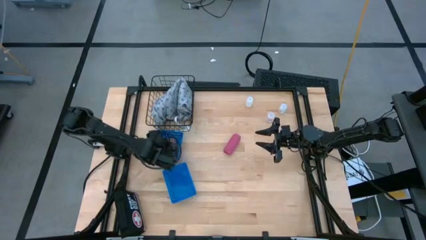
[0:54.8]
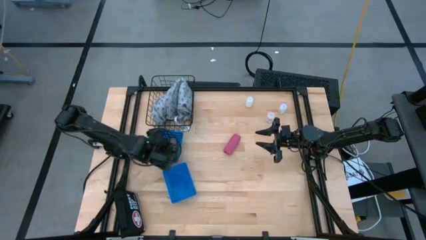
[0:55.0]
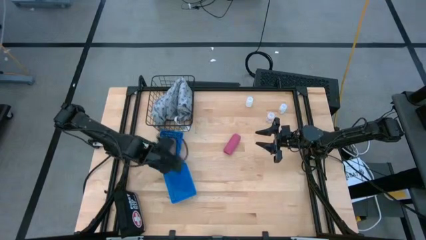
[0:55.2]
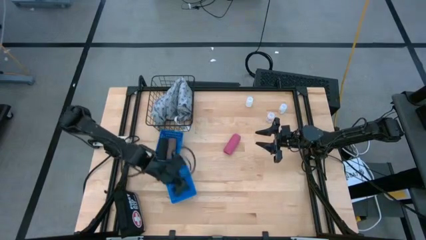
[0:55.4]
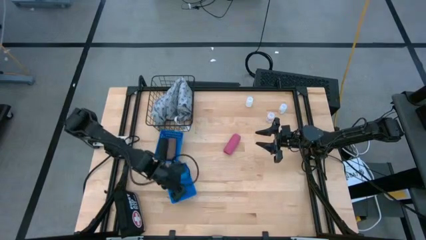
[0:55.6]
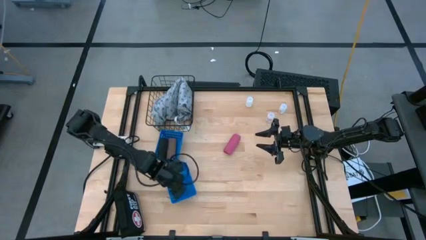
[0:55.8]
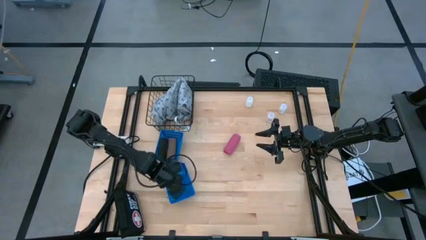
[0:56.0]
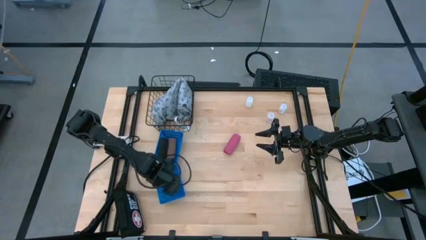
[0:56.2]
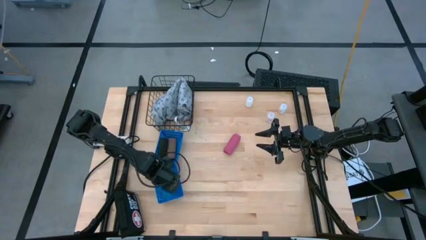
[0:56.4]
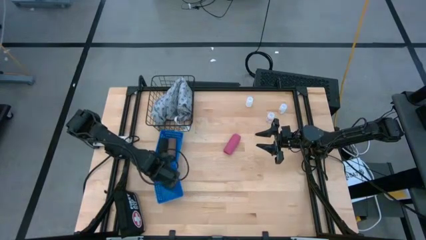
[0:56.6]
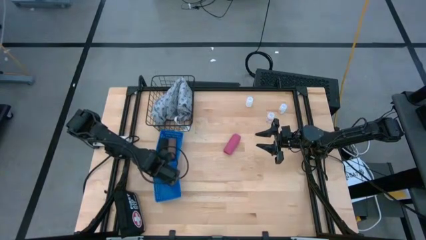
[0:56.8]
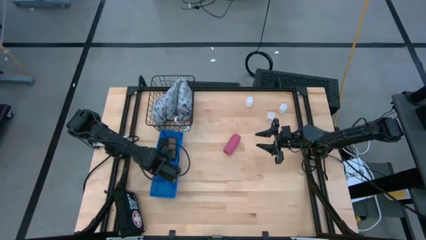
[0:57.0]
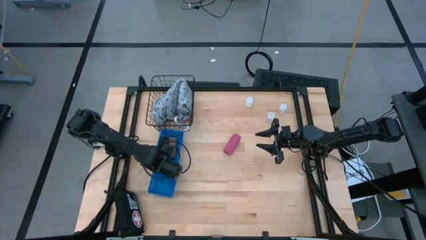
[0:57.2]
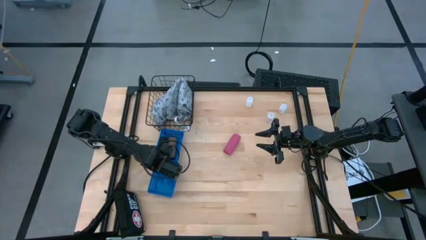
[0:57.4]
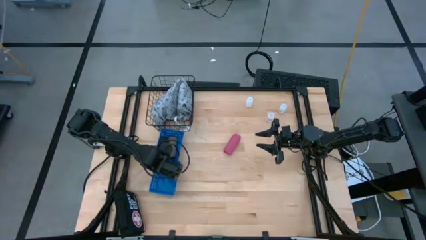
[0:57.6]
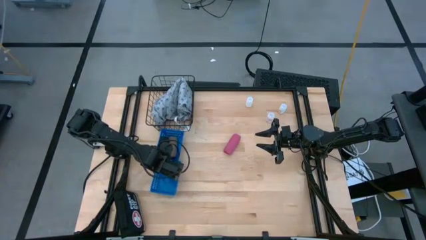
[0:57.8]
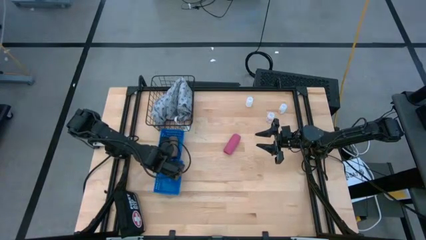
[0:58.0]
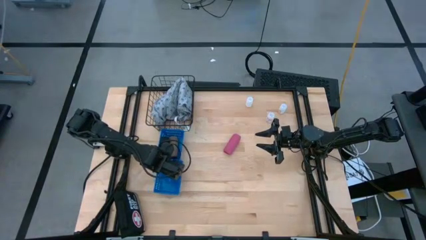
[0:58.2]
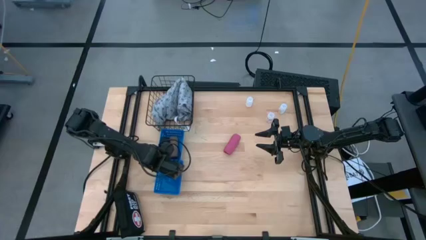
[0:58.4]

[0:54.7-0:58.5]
Task: Pick & Place Medicine items
Adjust the bottom blue basket

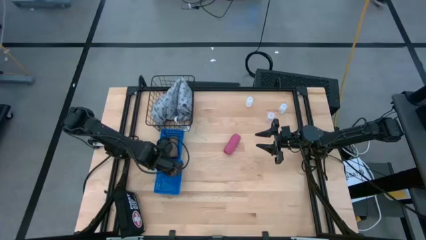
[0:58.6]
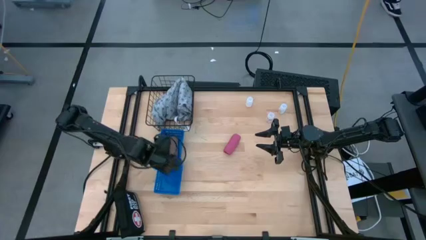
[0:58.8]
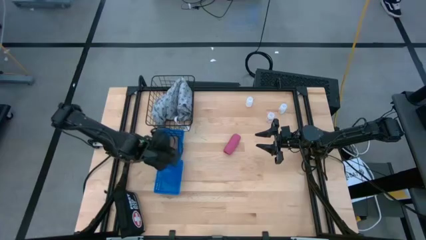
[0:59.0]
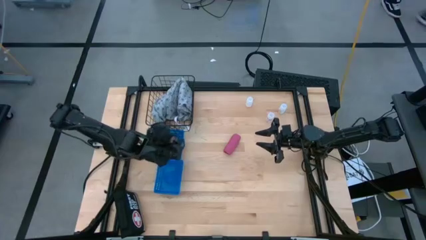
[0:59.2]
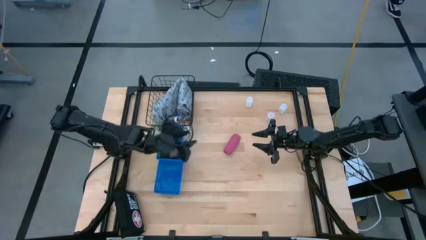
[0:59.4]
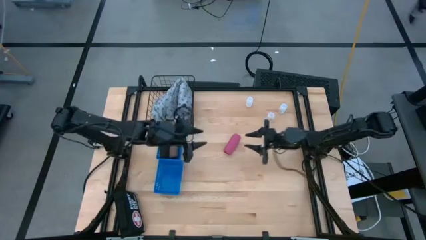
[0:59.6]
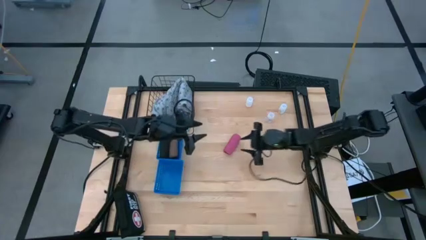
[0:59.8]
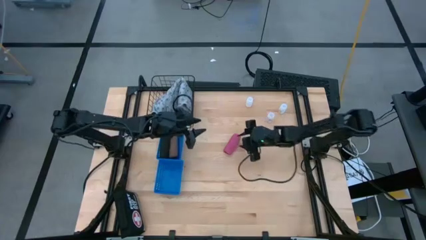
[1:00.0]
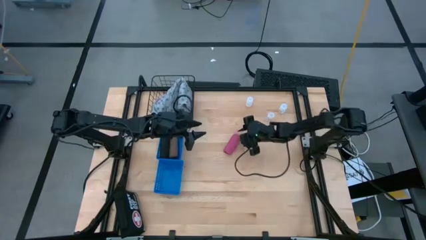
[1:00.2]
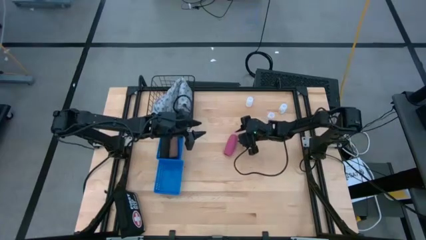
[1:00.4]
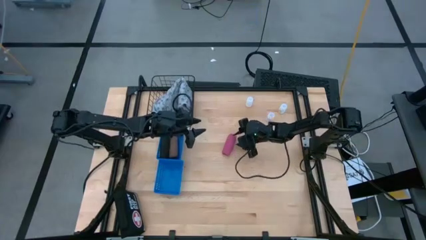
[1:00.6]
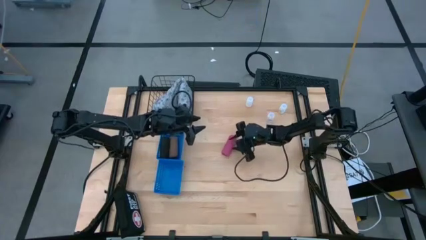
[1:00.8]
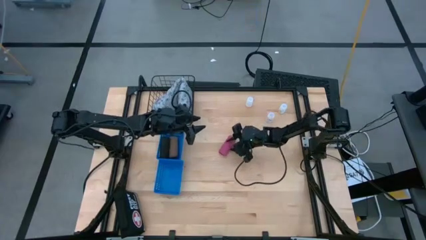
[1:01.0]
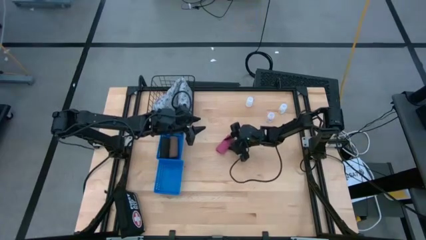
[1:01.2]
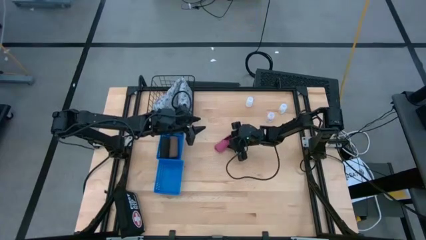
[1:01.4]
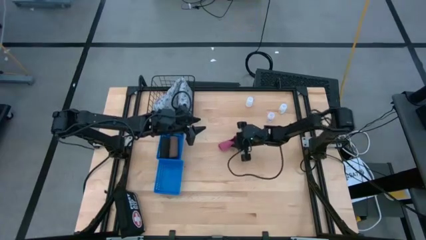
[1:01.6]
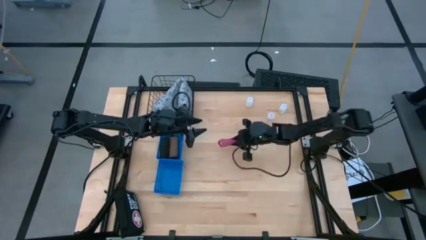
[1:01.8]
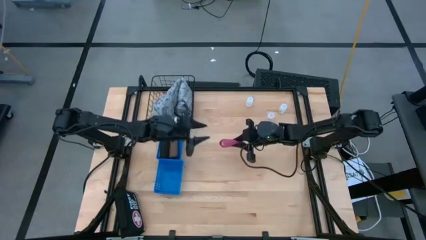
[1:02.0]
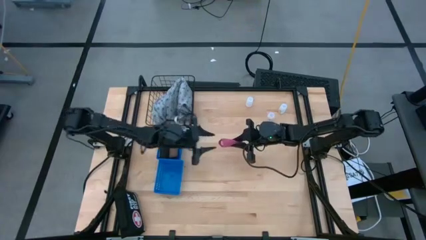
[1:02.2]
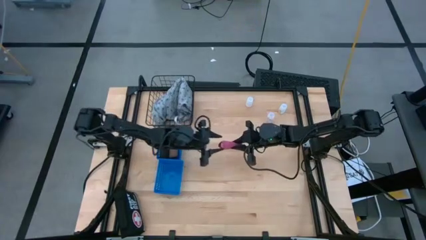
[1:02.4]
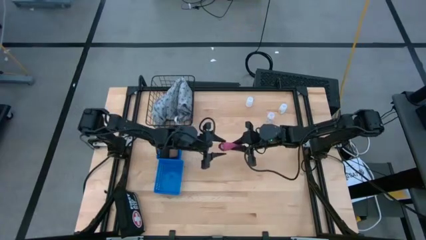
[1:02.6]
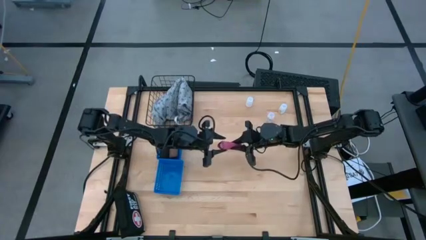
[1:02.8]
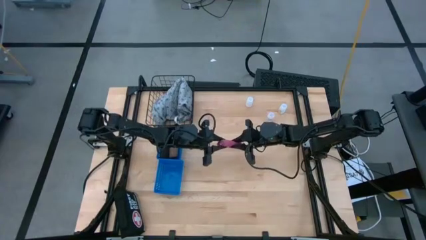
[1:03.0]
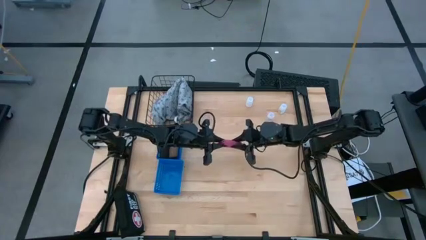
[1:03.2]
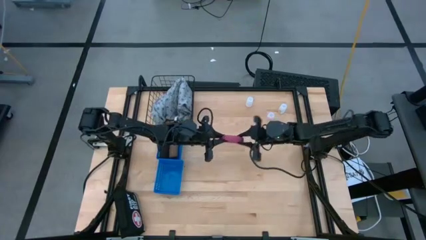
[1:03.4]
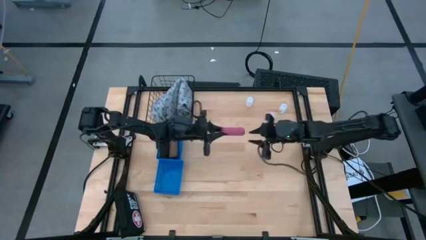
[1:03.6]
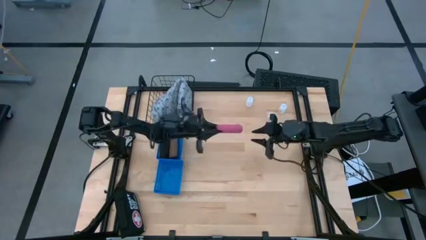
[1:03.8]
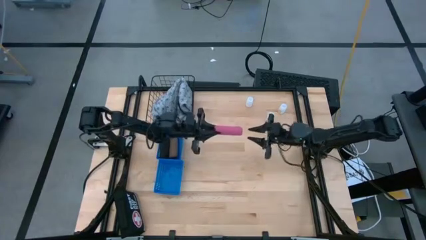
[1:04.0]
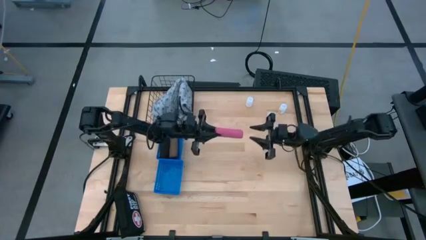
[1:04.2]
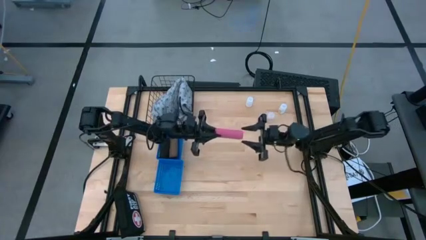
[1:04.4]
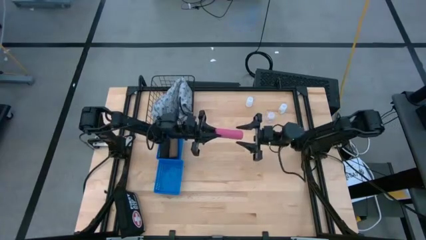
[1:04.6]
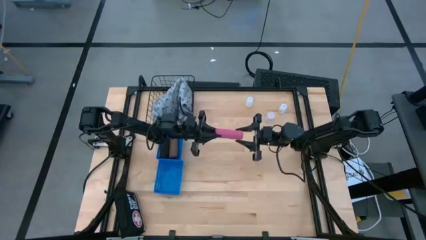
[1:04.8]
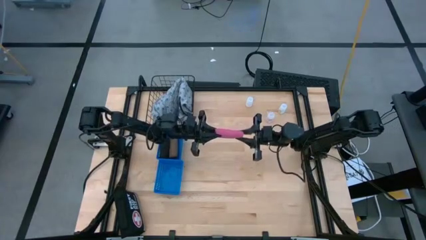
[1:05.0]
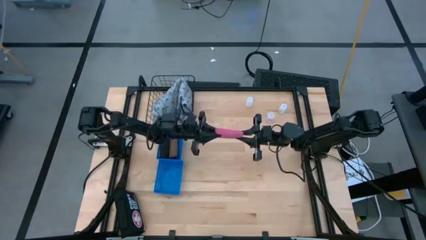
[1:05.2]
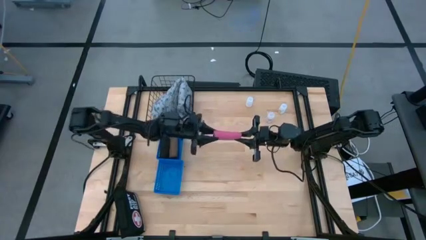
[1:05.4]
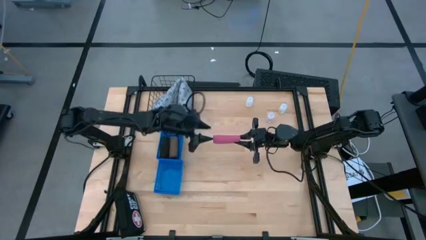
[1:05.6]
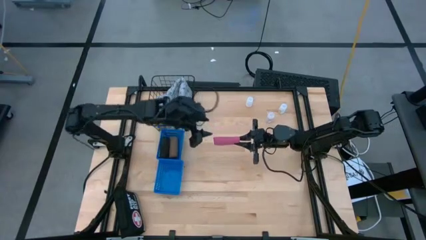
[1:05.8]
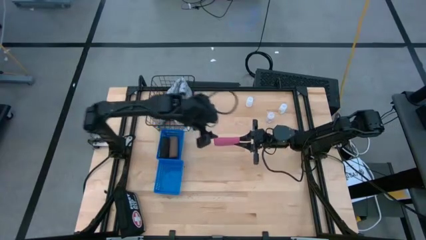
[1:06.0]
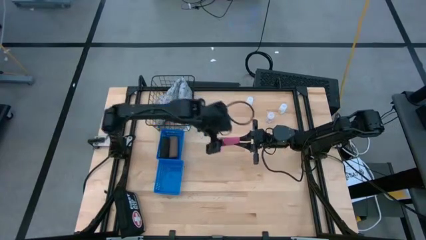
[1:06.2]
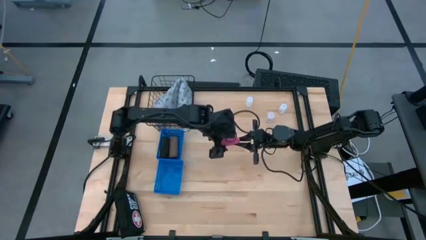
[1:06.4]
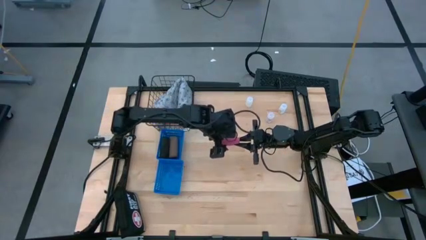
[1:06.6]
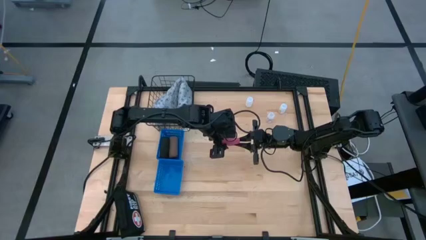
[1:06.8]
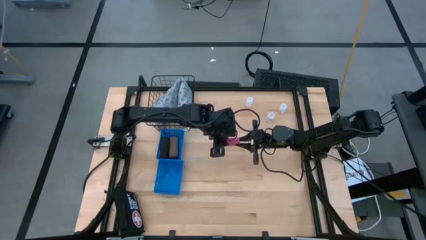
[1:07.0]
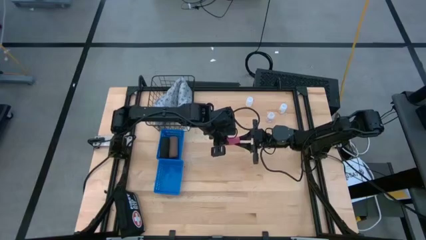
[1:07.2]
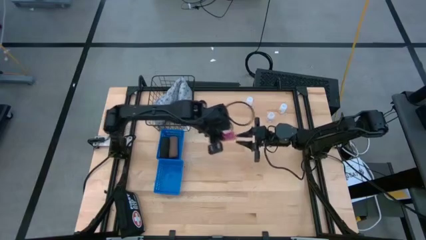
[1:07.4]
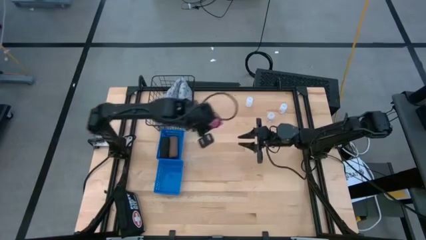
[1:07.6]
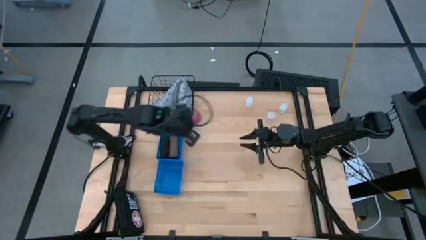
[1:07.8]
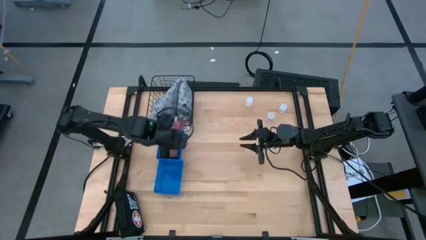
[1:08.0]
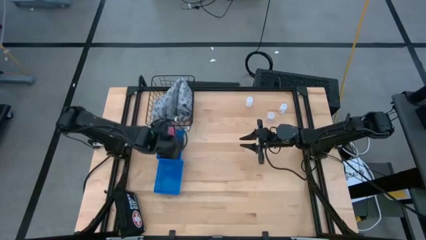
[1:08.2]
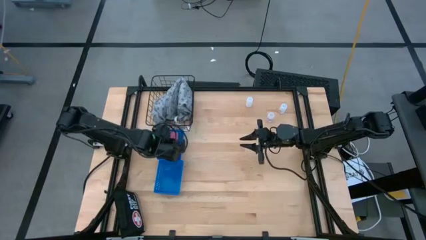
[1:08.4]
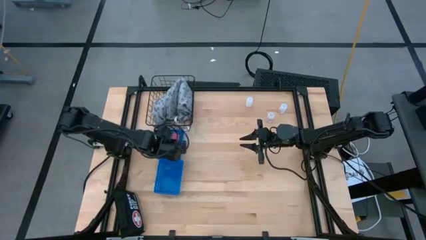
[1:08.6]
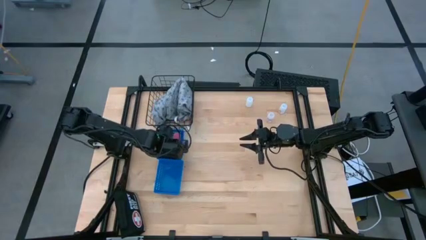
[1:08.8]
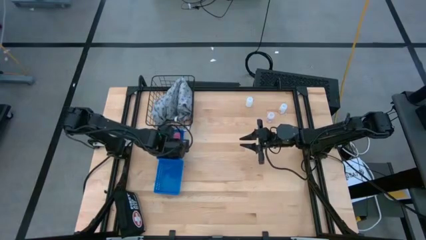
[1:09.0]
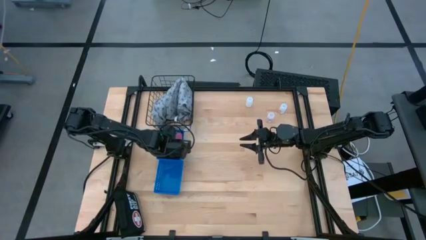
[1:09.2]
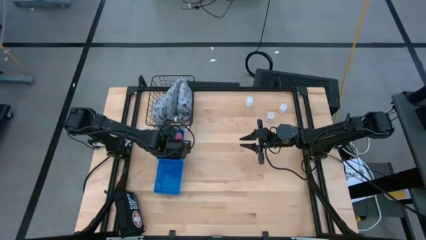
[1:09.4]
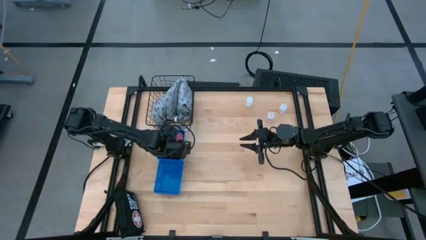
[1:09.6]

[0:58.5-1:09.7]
Put the pink bandage into the top blue basket
